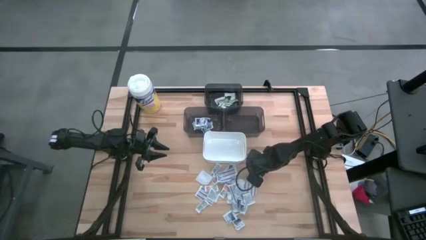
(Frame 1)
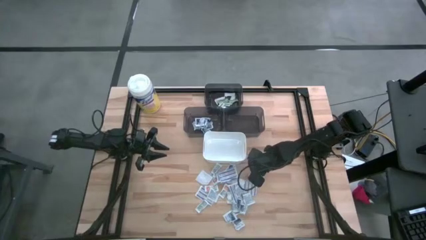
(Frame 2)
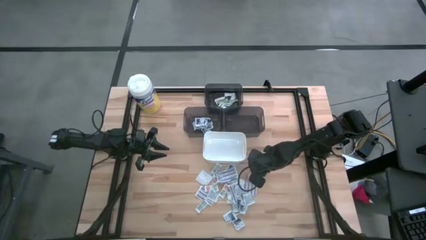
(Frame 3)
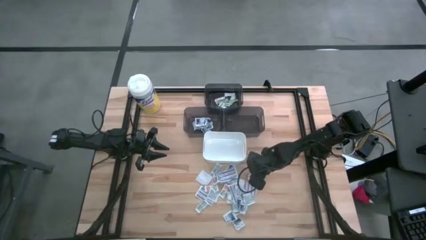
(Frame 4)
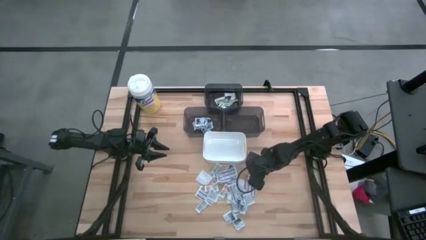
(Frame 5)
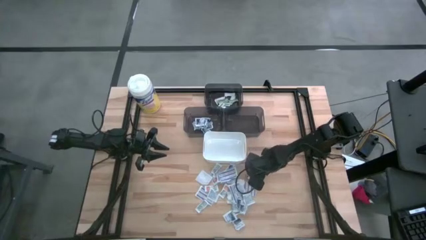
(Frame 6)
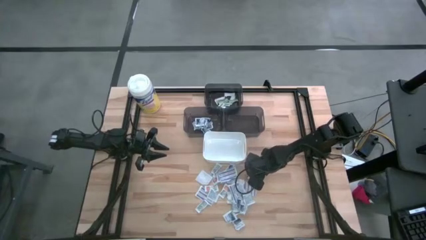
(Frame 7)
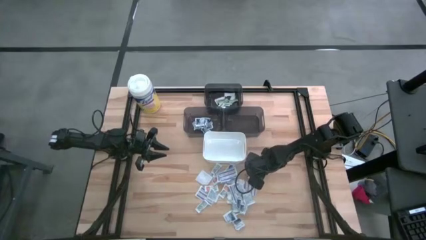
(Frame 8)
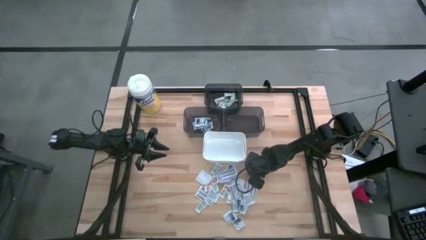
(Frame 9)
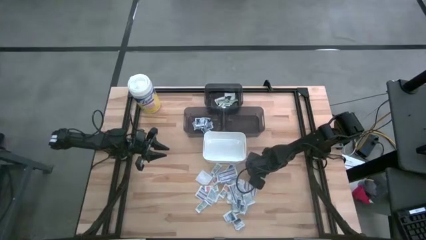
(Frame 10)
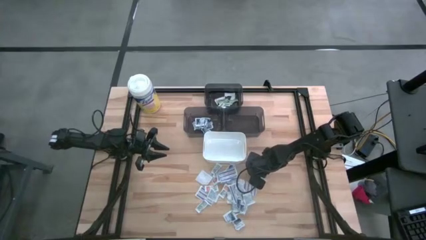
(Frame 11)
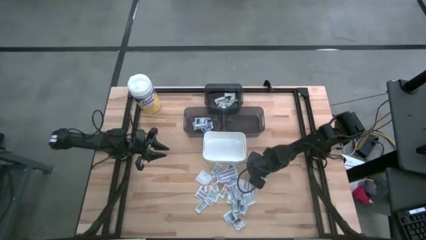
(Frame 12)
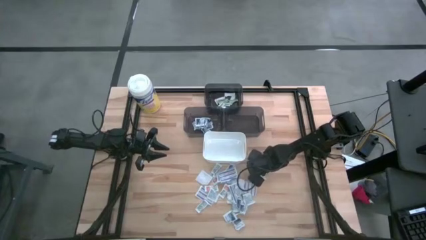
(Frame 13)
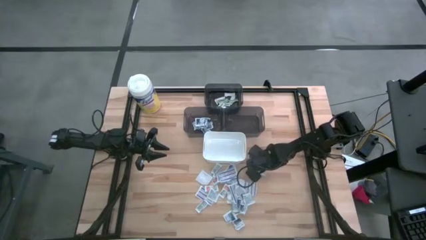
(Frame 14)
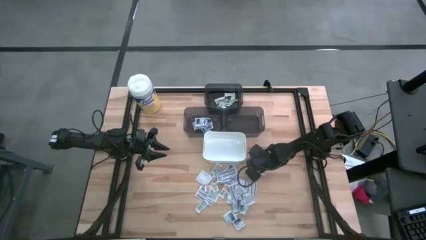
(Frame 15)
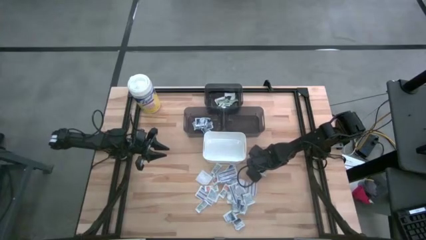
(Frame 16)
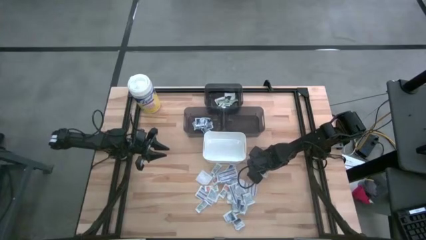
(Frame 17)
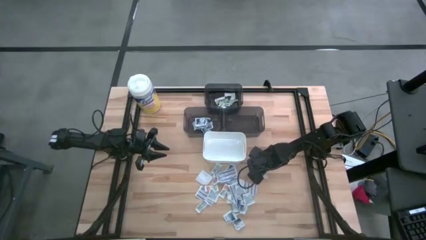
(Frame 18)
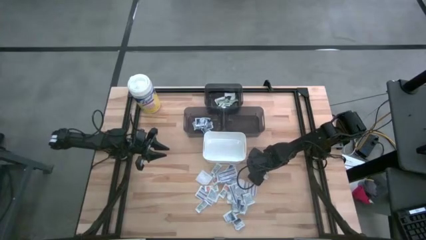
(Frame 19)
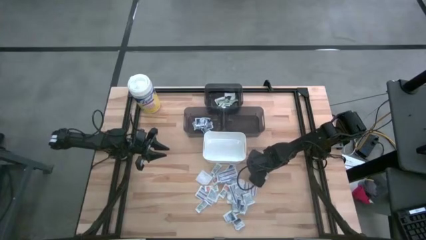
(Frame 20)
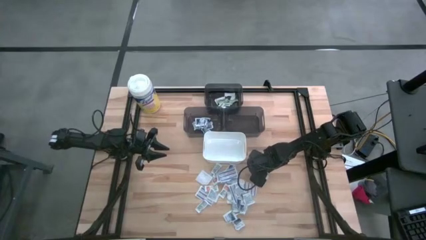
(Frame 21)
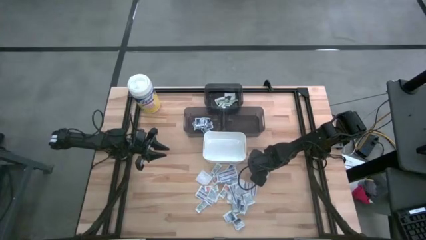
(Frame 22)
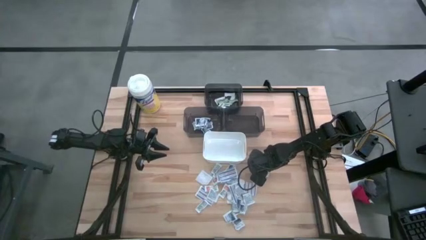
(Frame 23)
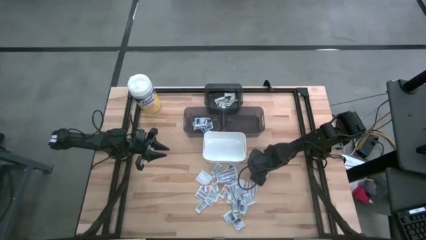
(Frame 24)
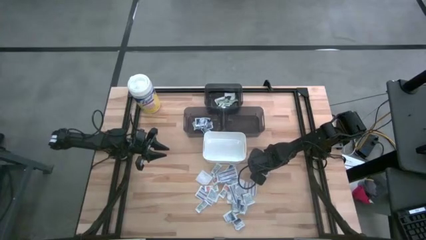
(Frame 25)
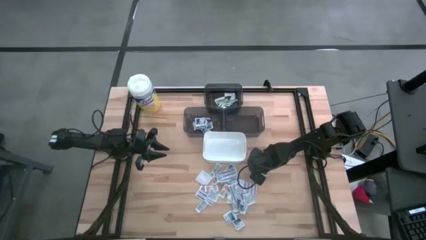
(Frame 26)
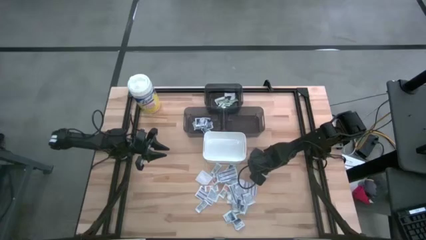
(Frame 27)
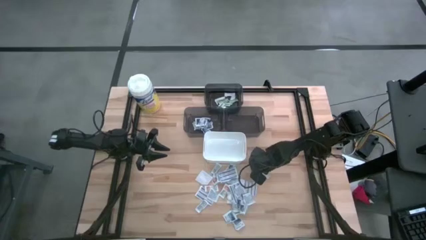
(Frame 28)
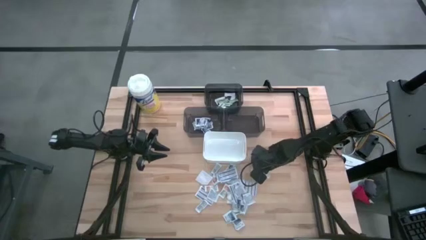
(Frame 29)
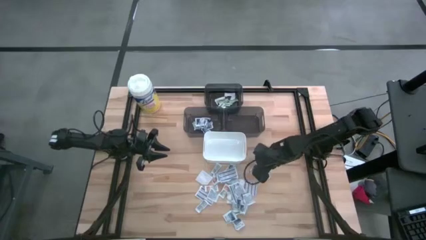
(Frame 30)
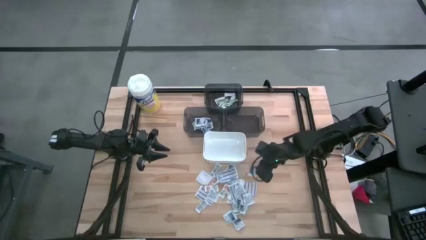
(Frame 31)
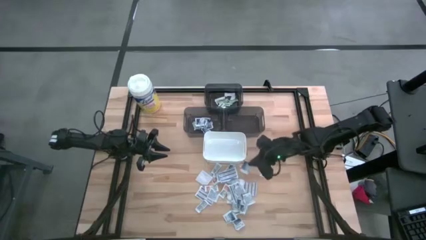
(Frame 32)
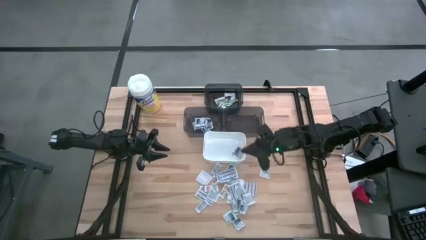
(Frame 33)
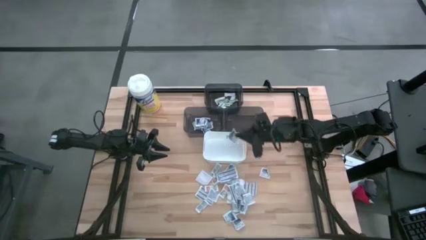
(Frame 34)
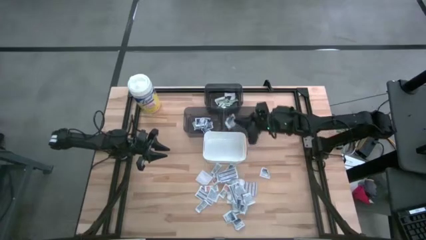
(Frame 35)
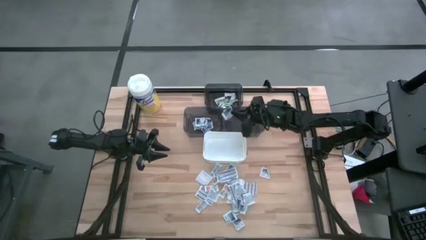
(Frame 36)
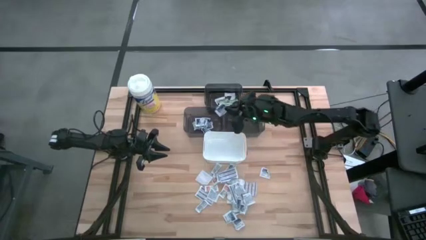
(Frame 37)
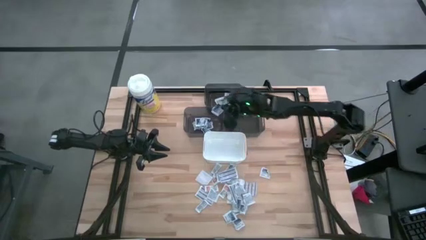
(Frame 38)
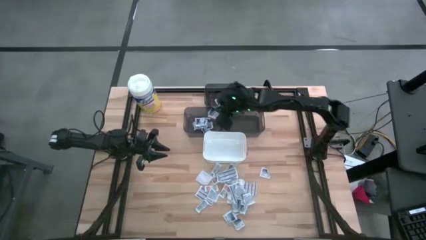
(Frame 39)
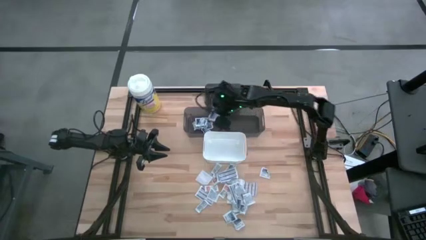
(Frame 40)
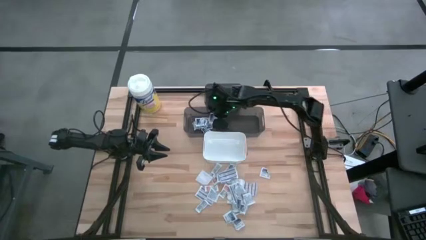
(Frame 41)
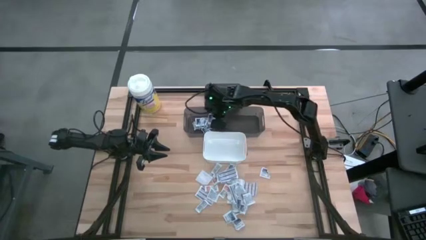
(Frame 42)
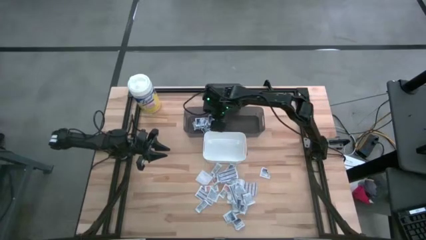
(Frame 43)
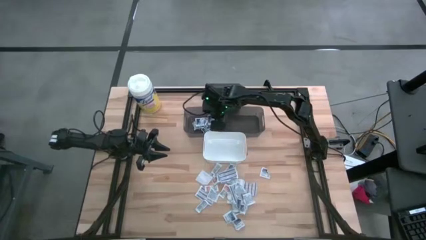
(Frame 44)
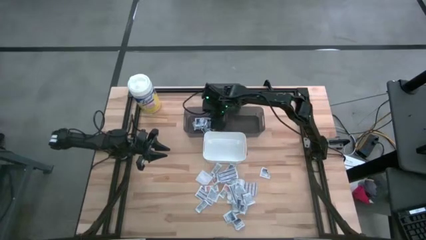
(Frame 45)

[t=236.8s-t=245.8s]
Task: Pick & Place First Aid Supplies
Put the alcohol pad into the left black bin

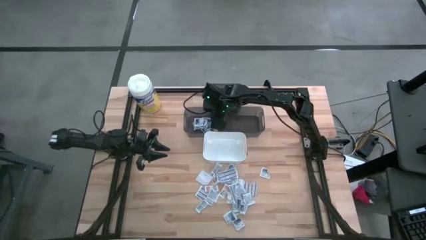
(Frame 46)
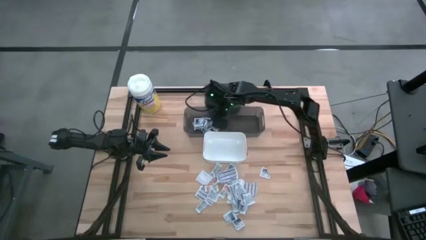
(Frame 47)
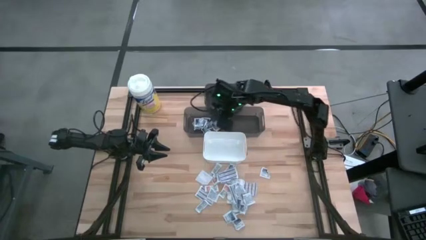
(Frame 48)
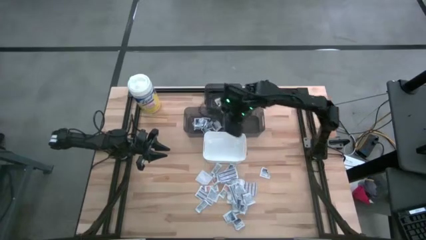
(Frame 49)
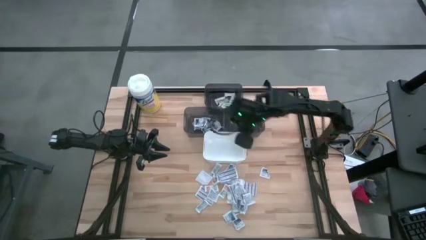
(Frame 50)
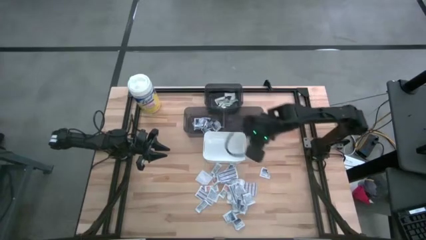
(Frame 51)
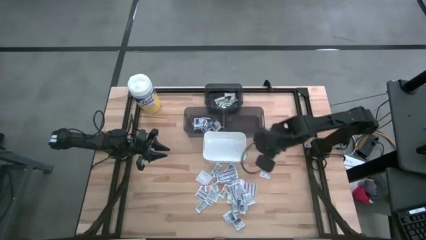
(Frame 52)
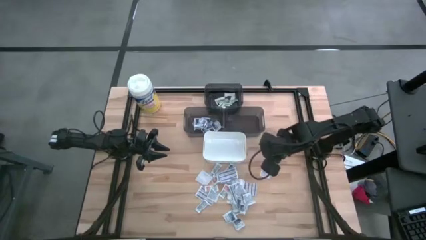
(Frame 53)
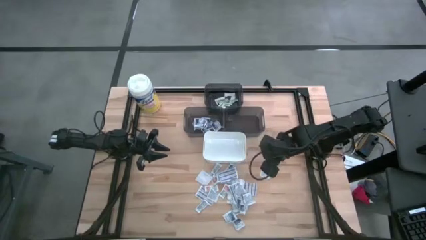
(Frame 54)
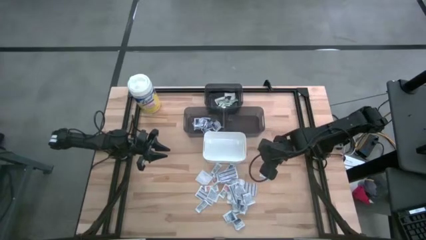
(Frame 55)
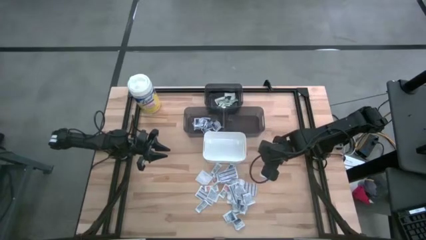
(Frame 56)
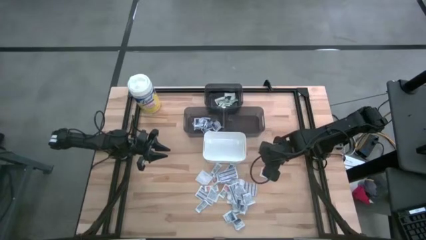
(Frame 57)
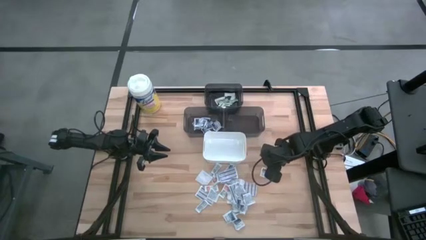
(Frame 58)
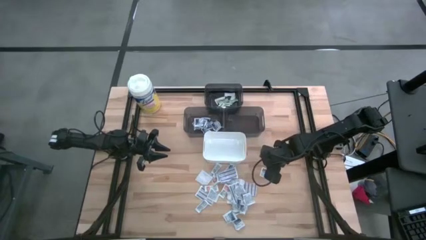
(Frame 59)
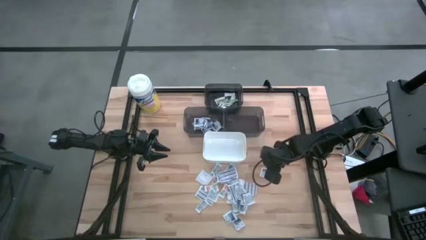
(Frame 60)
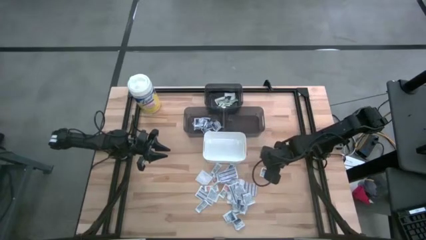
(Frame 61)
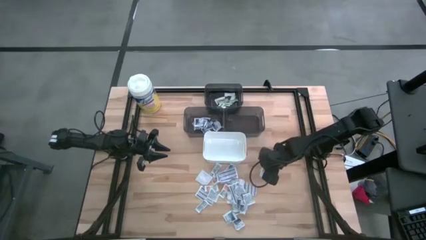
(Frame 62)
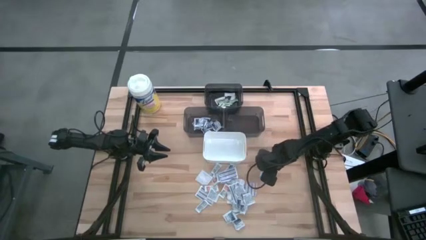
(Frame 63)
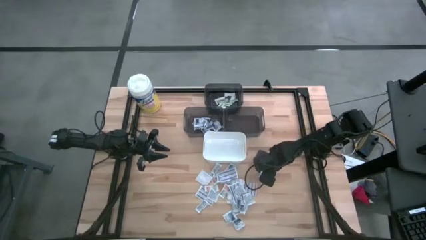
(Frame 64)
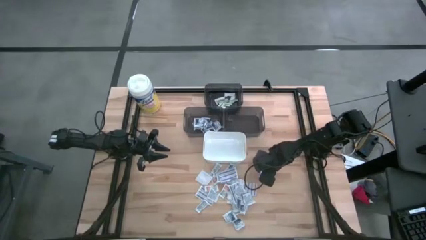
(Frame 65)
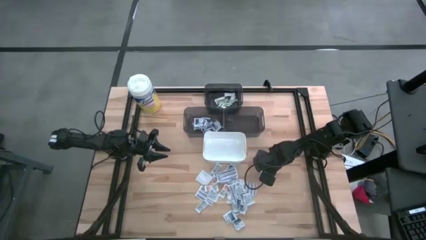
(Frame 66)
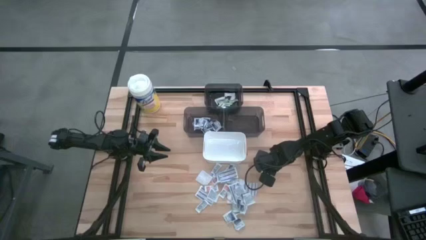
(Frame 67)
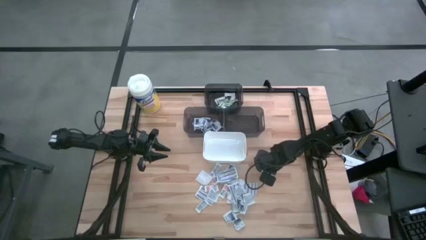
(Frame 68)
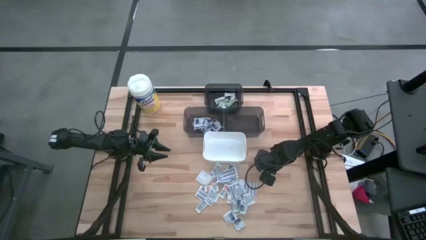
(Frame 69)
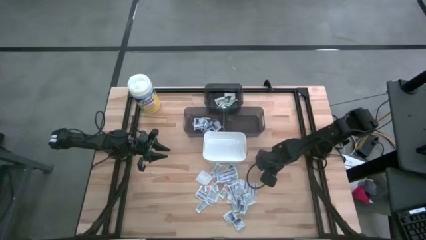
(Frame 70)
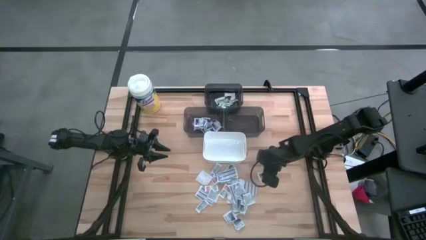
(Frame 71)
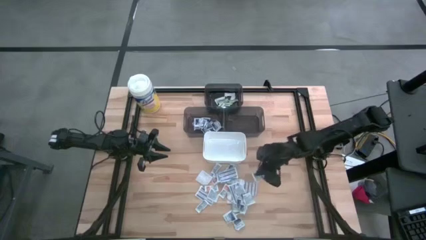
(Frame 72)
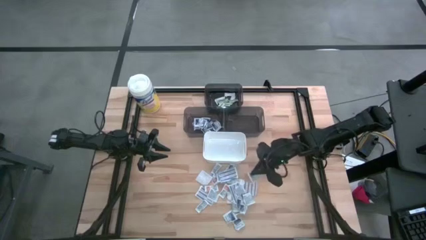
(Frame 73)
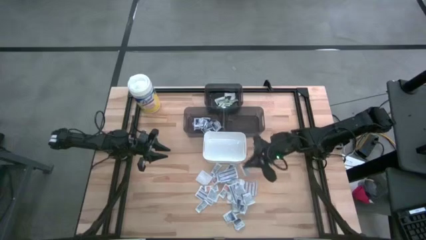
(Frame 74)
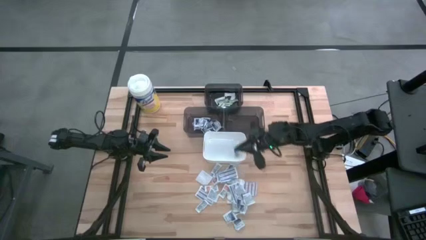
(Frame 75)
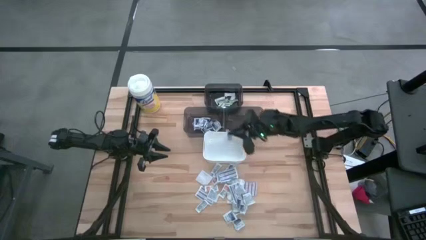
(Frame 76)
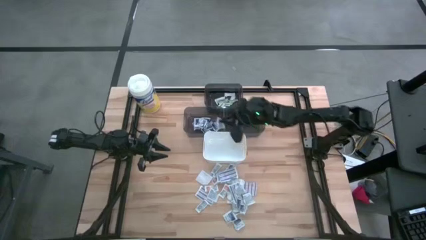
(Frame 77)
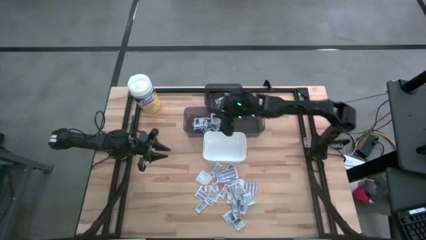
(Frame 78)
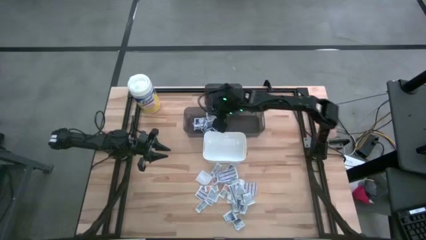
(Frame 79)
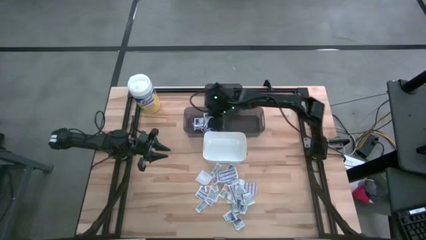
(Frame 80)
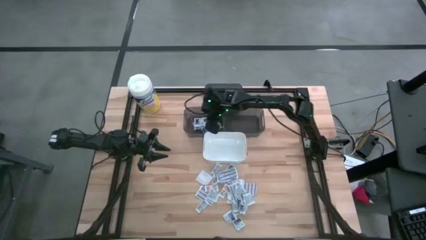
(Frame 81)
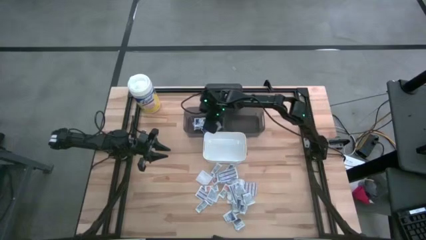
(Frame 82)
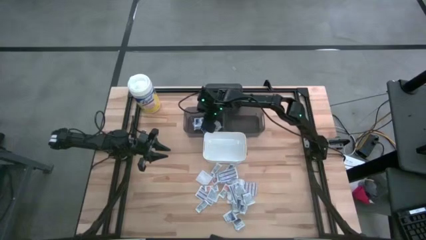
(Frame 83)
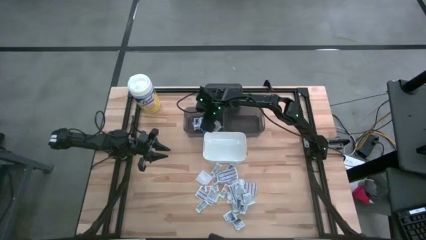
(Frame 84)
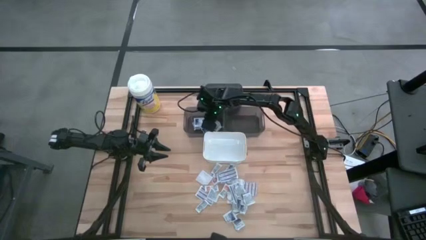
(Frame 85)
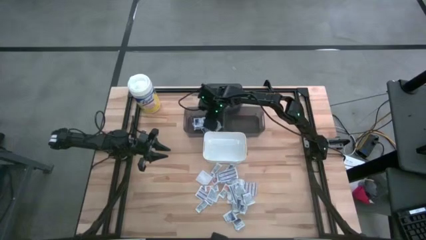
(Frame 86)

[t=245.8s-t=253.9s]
Put the alcohol pad into the left black bin
